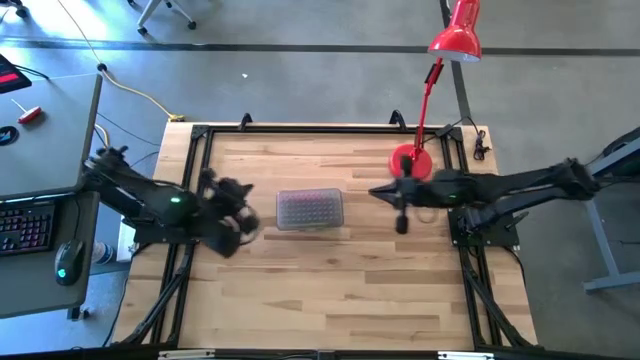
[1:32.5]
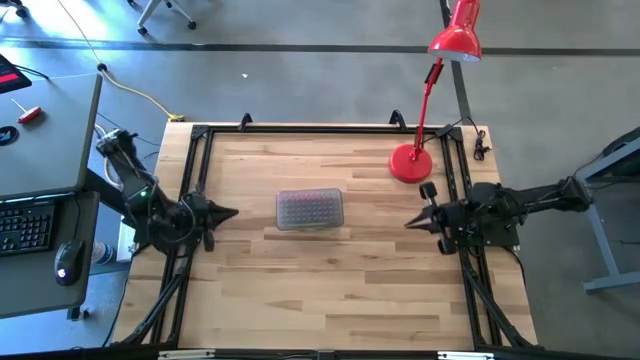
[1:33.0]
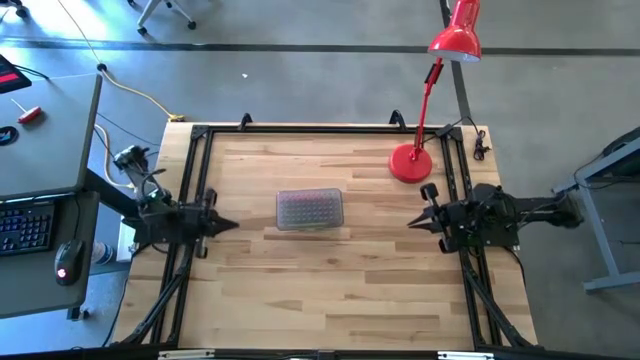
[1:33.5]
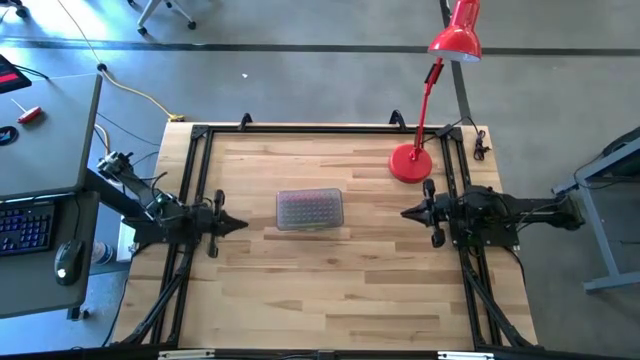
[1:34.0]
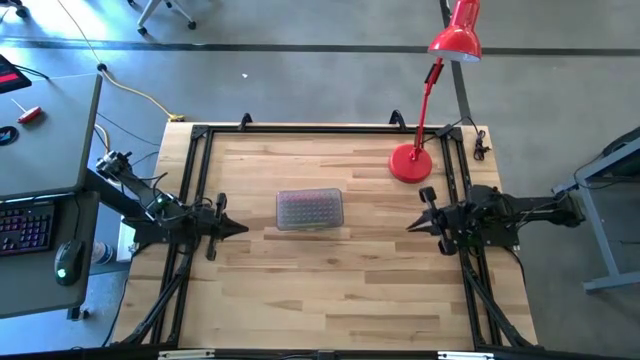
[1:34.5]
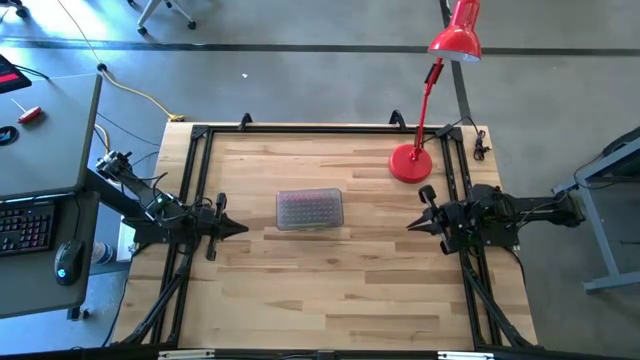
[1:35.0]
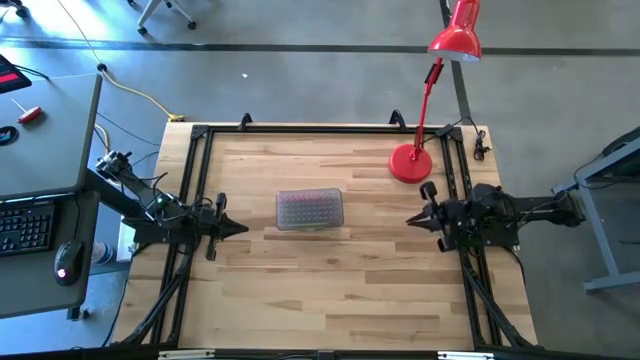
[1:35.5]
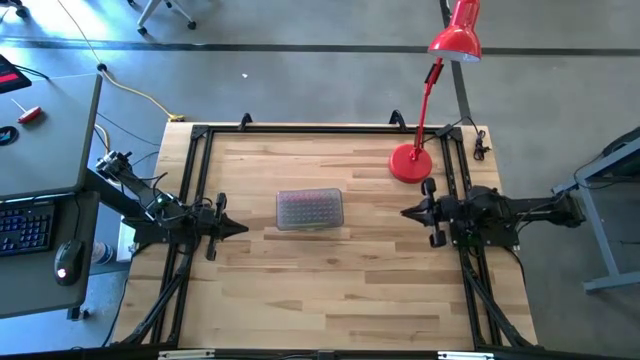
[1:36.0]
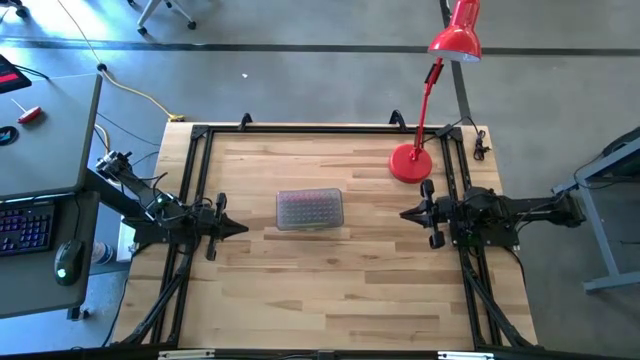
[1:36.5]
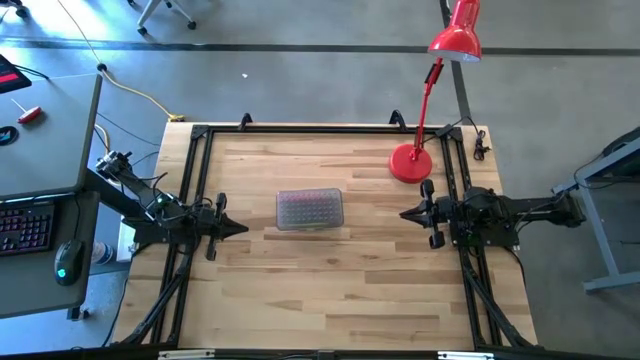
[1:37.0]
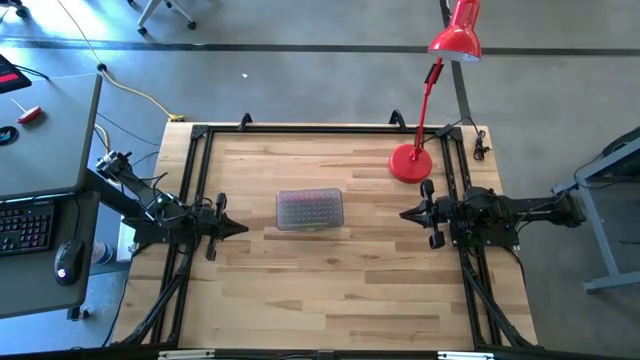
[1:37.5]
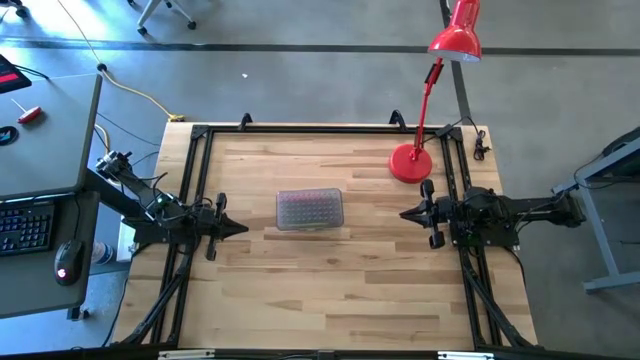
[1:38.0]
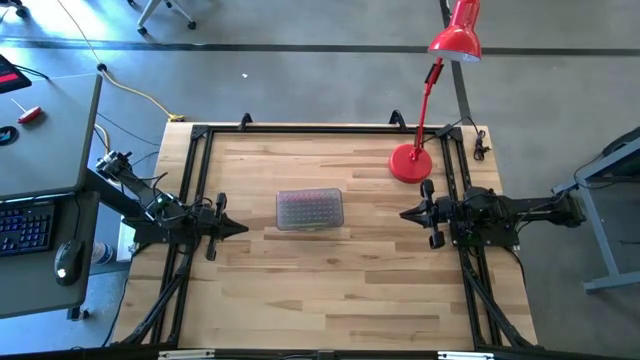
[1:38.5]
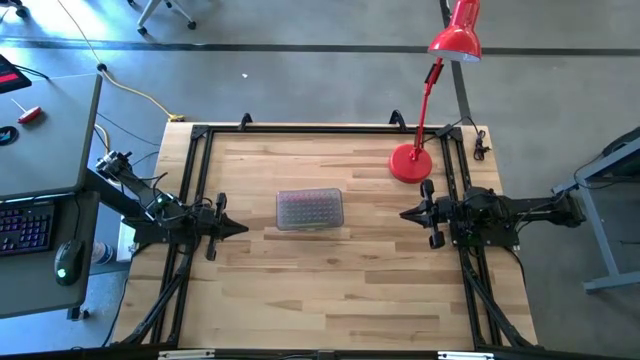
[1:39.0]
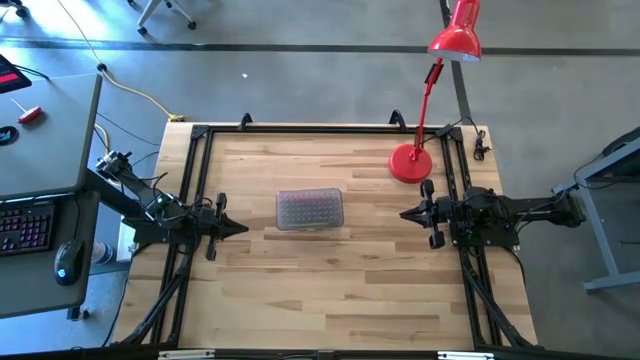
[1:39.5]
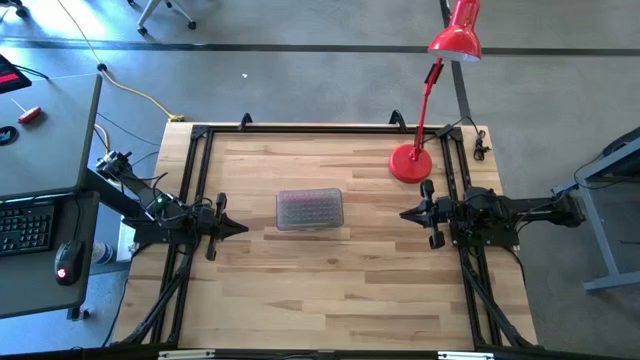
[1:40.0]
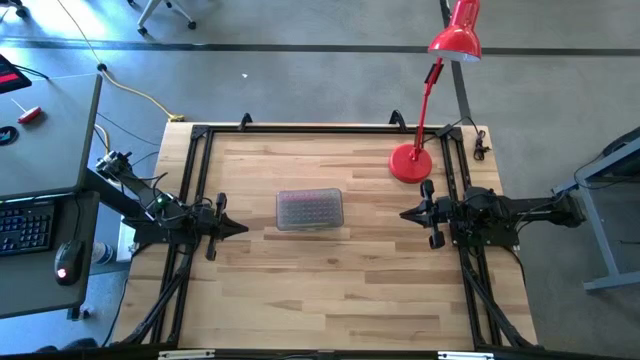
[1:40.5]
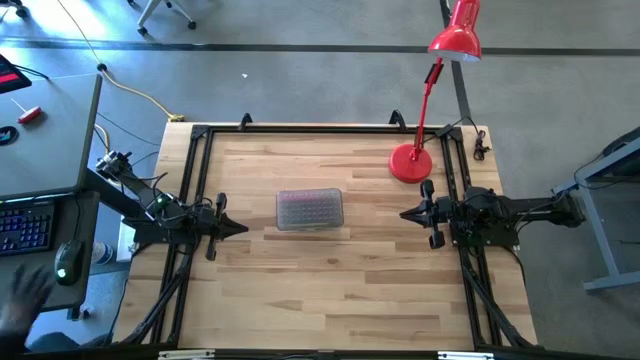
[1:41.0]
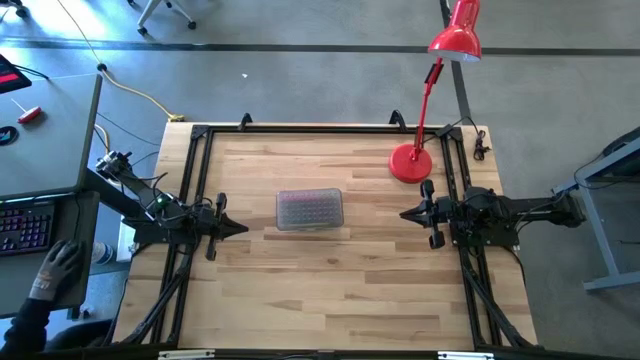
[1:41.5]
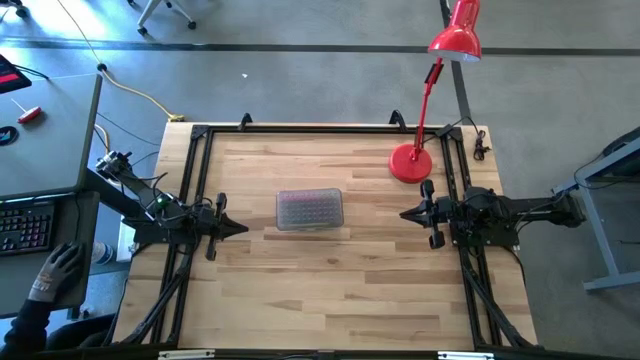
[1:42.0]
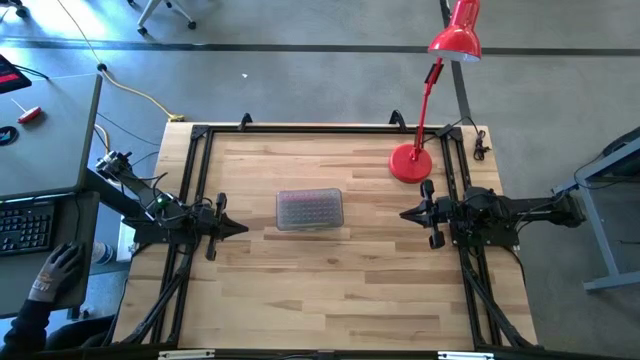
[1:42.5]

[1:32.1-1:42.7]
Task: Pick & place school supplies into a supply box
Return to Home Position

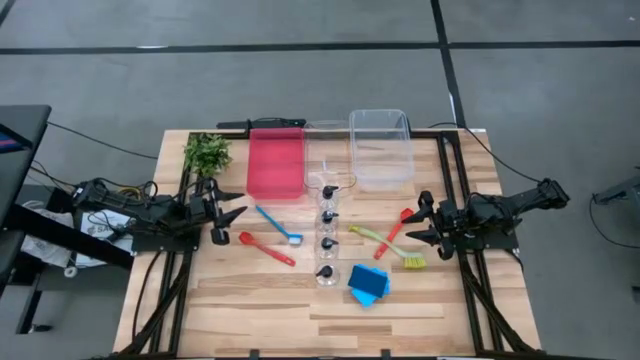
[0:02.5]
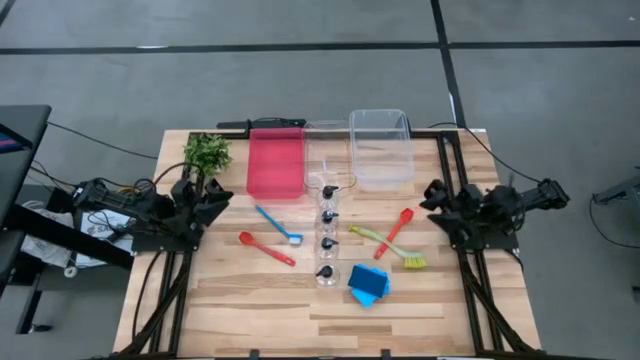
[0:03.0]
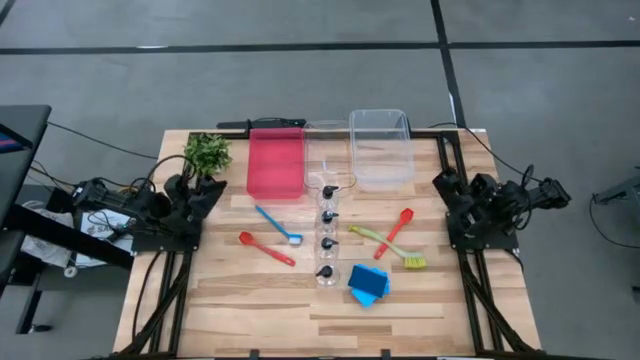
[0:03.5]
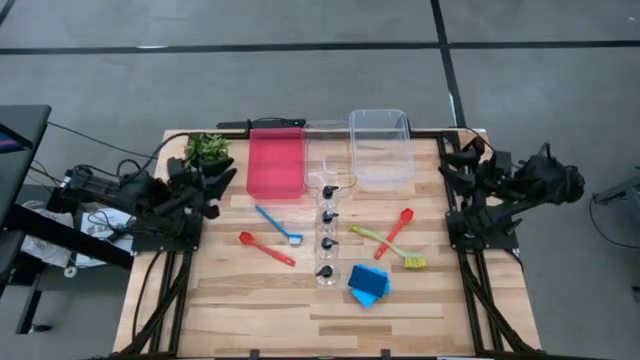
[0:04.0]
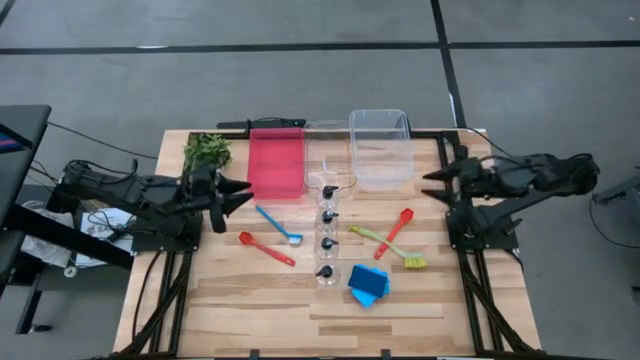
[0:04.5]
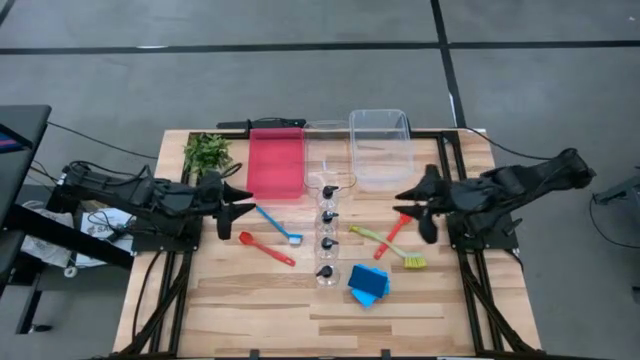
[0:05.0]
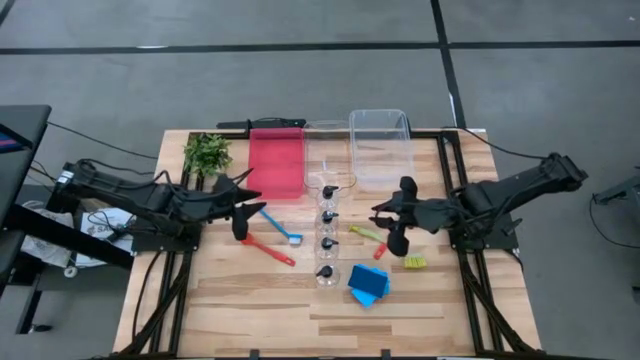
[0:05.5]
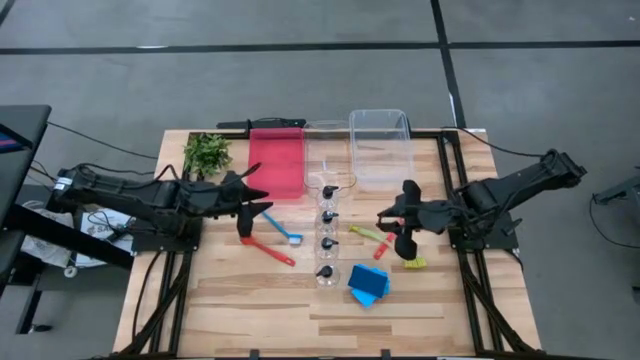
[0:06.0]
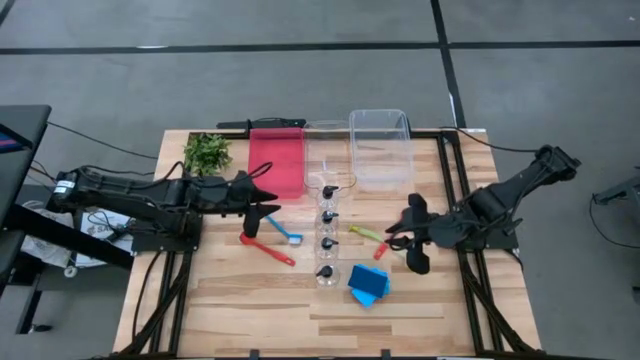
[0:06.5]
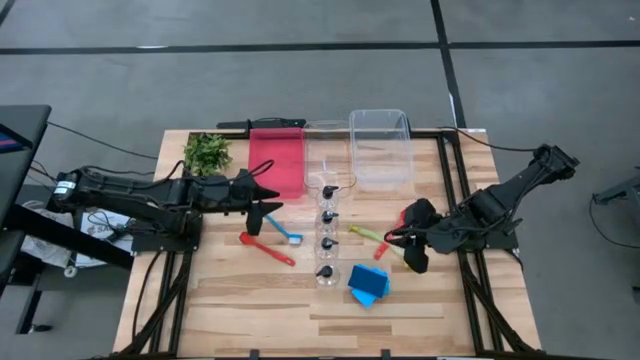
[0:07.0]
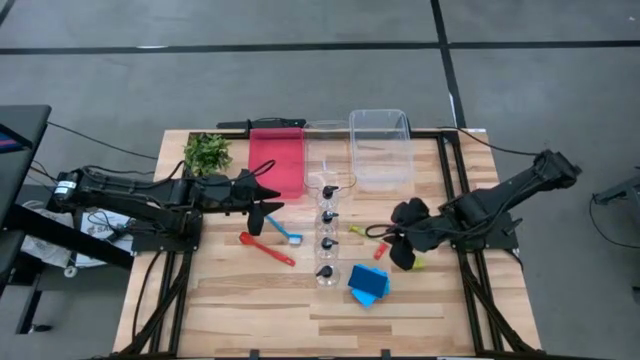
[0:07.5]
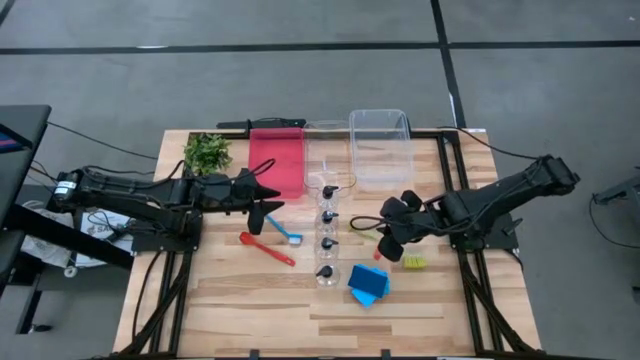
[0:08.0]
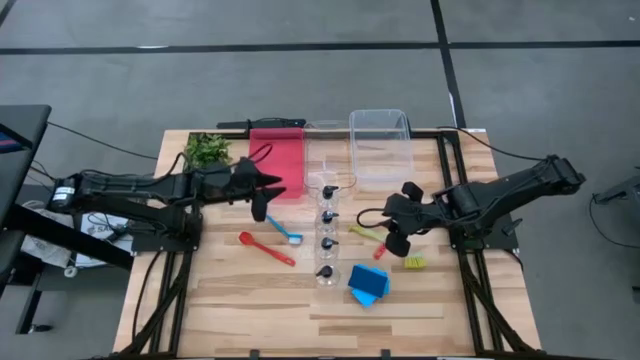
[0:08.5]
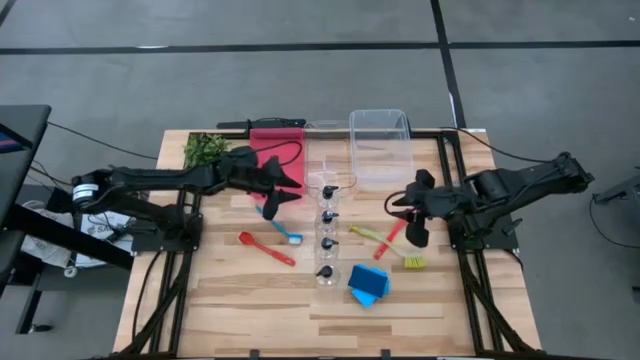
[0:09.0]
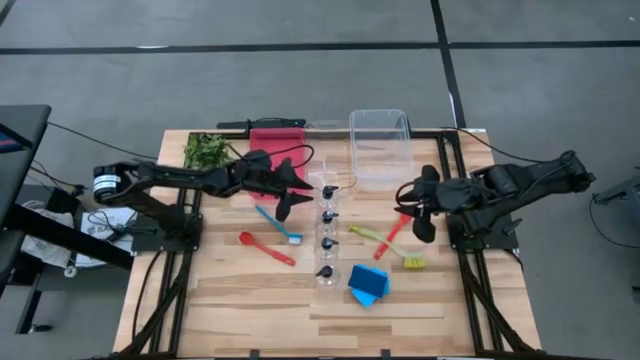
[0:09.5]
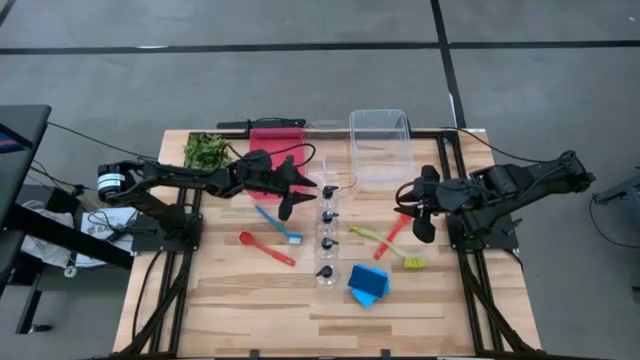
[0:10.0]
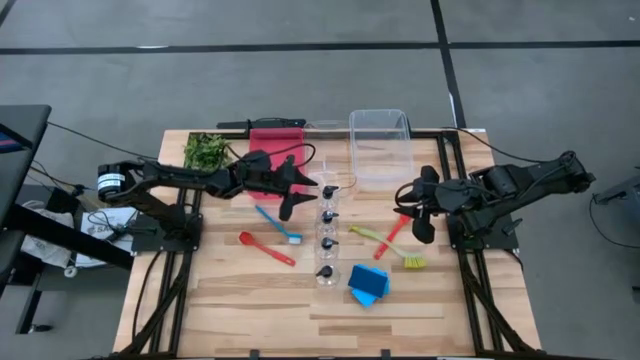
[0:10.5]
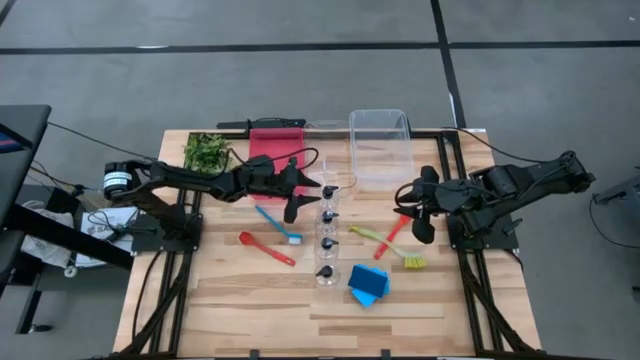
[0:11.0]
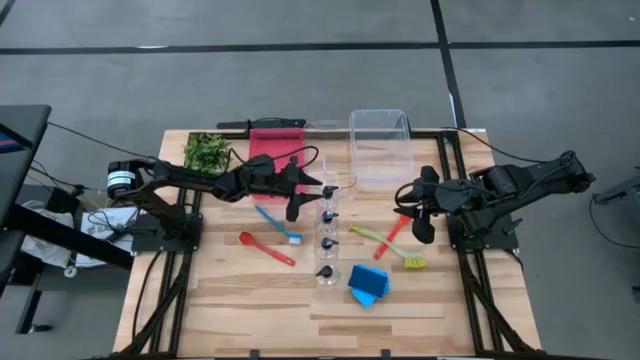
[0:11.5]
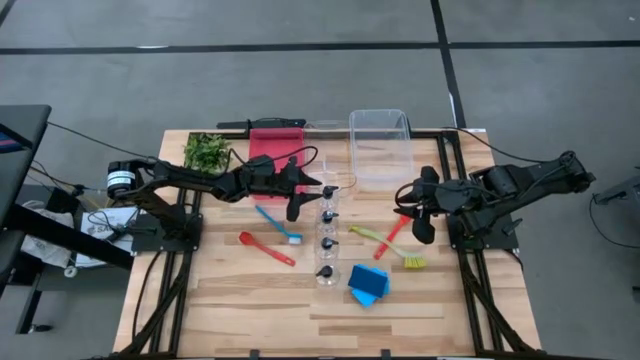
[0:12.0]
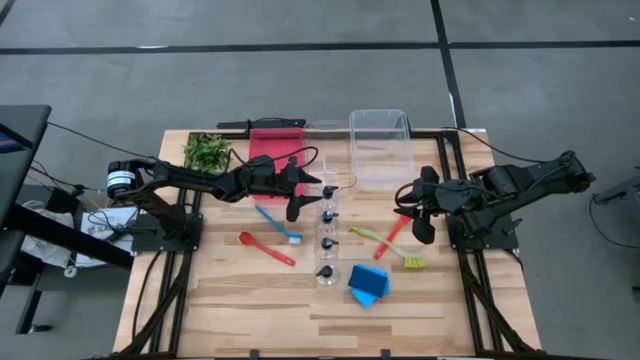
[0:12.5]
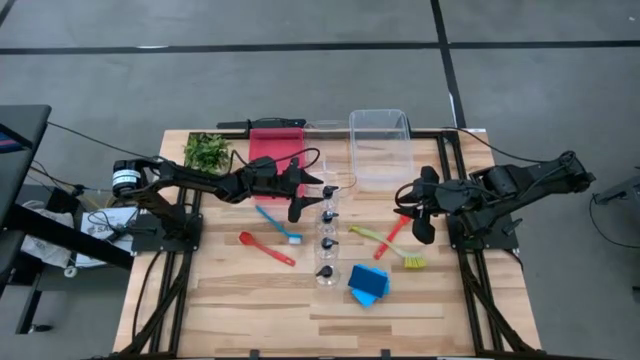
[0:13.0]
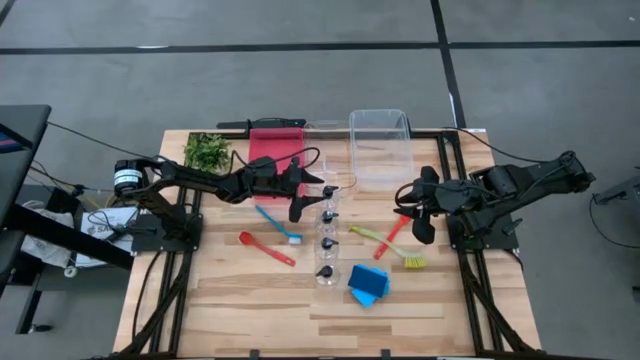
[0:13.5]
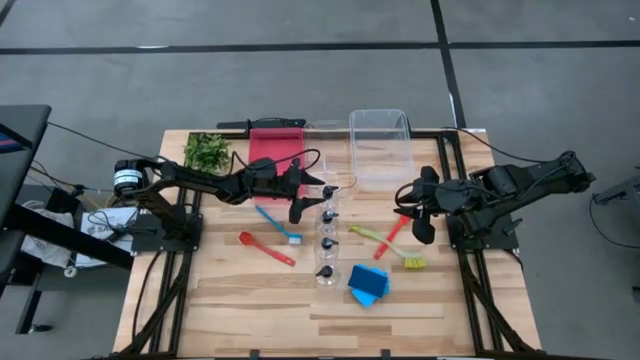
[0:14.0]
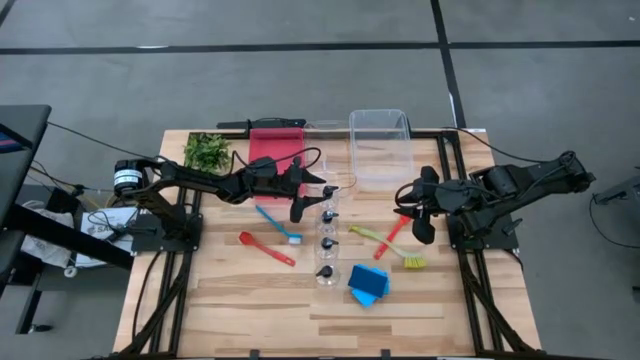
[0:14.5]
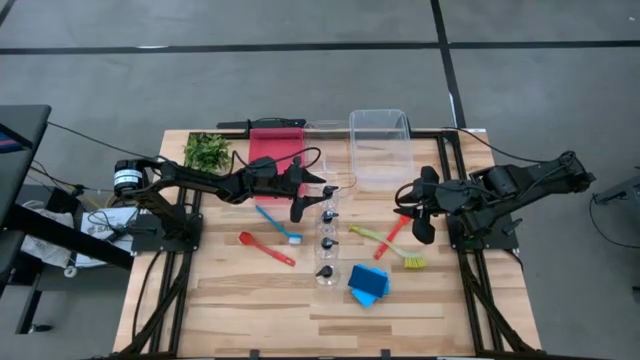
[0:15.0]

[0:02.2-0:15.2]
Task: Pick & Place Kitchen Sink Supplies
Put the spray bottle into the pink bin
